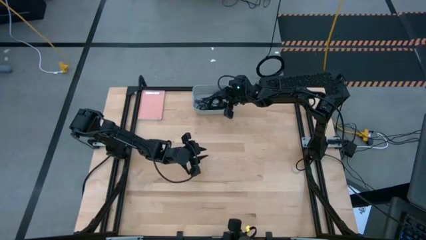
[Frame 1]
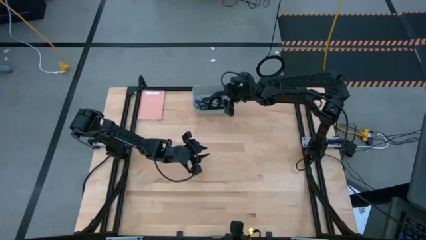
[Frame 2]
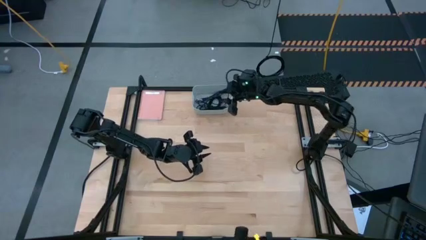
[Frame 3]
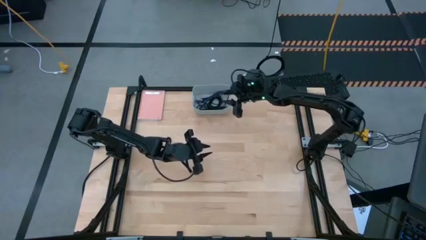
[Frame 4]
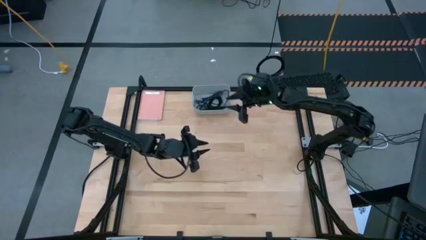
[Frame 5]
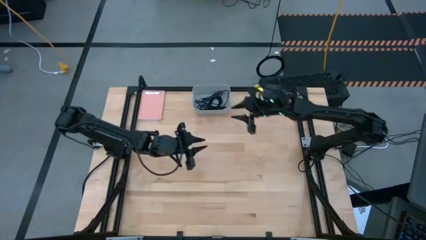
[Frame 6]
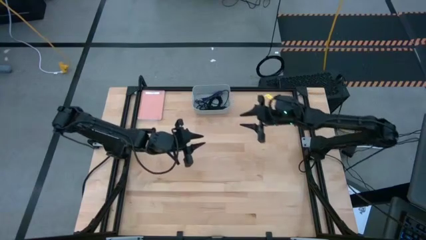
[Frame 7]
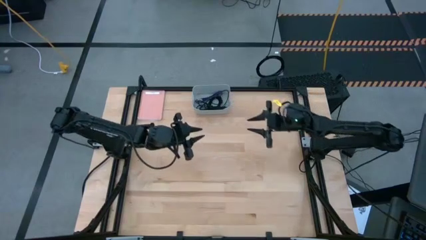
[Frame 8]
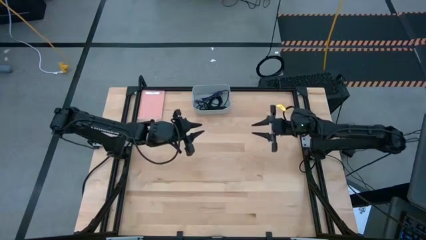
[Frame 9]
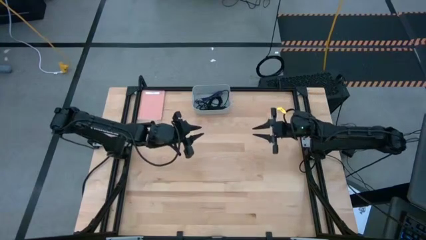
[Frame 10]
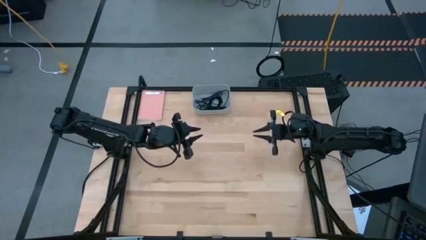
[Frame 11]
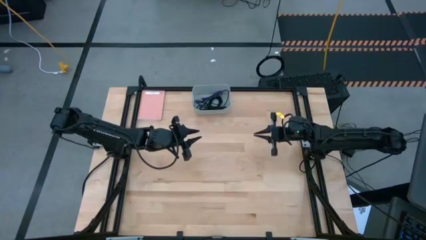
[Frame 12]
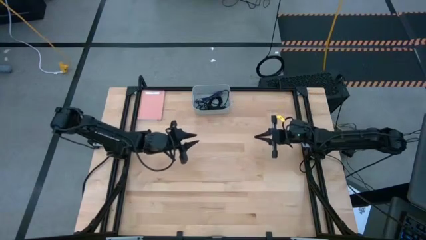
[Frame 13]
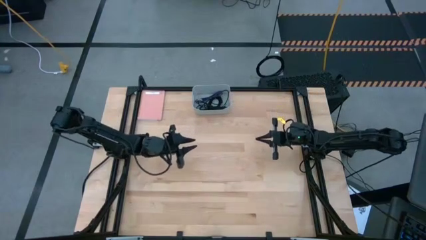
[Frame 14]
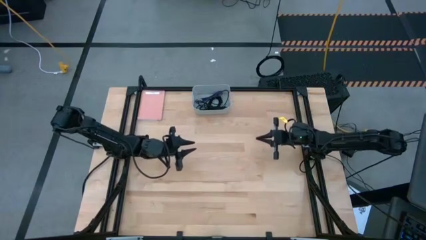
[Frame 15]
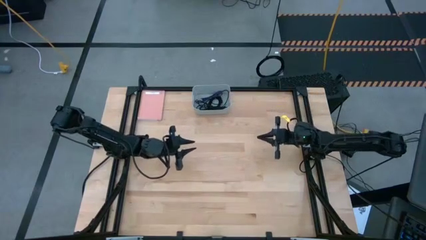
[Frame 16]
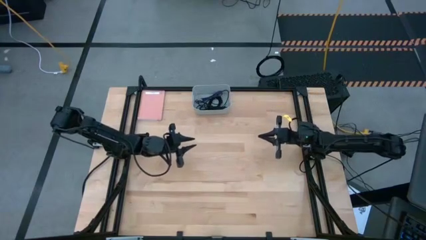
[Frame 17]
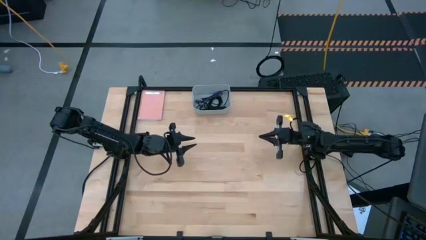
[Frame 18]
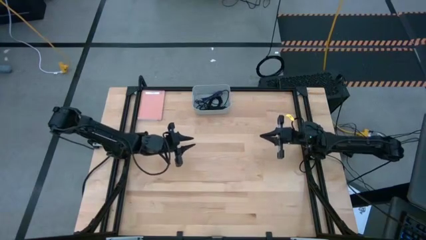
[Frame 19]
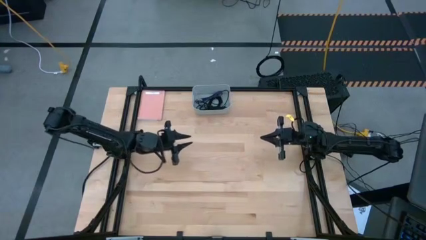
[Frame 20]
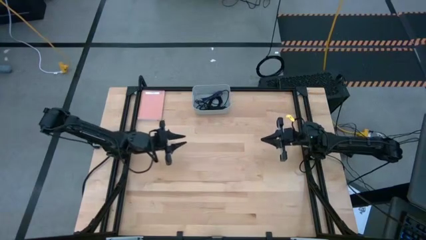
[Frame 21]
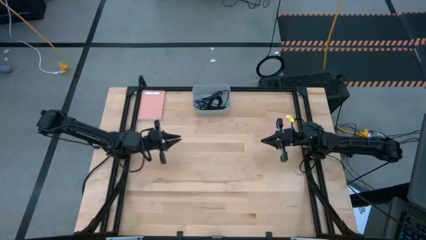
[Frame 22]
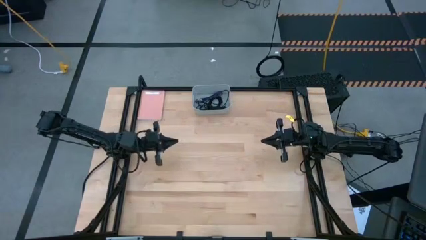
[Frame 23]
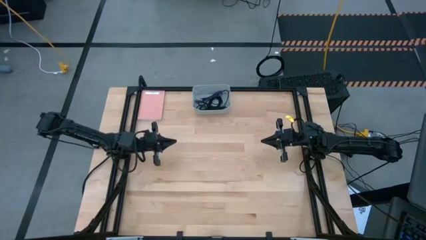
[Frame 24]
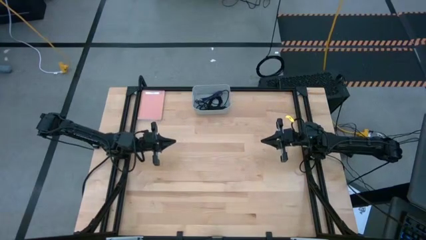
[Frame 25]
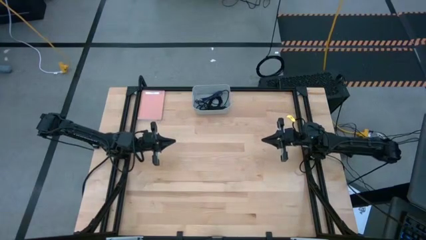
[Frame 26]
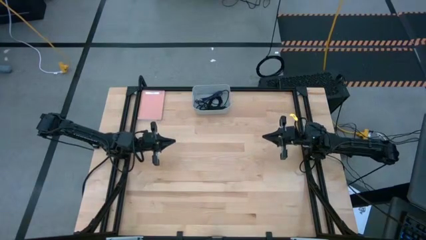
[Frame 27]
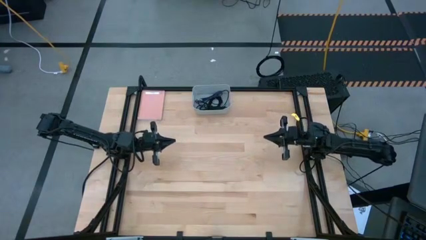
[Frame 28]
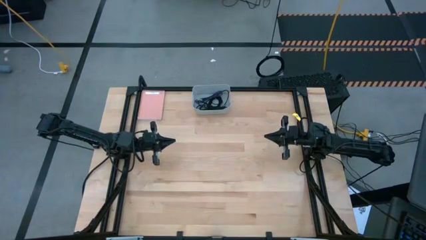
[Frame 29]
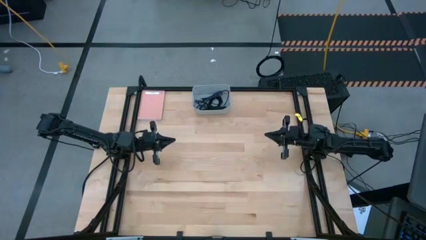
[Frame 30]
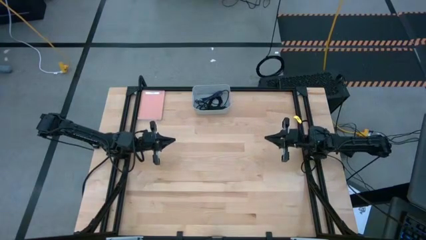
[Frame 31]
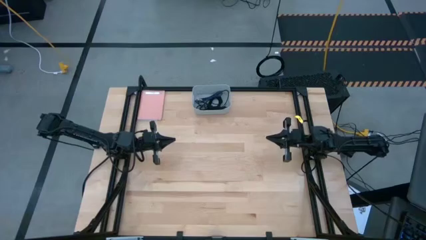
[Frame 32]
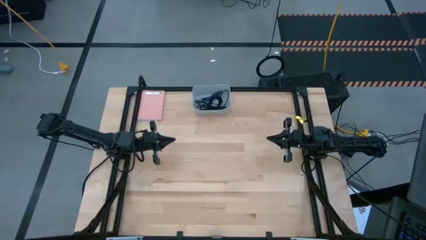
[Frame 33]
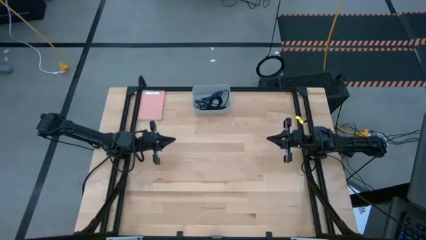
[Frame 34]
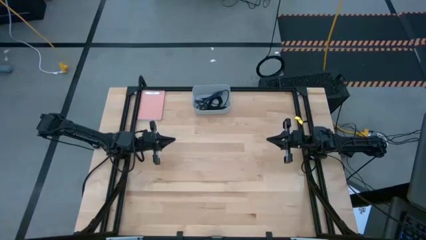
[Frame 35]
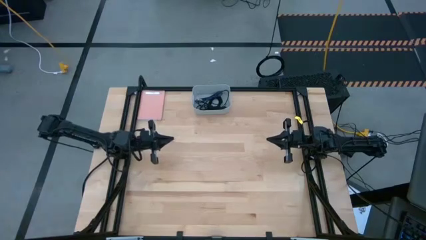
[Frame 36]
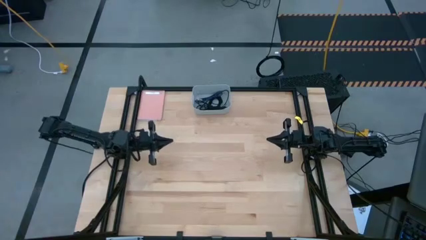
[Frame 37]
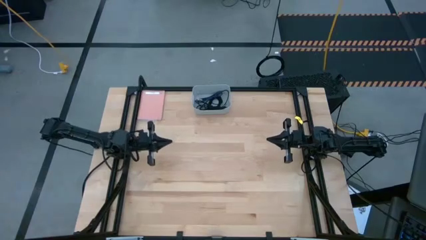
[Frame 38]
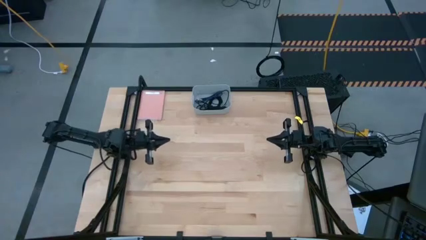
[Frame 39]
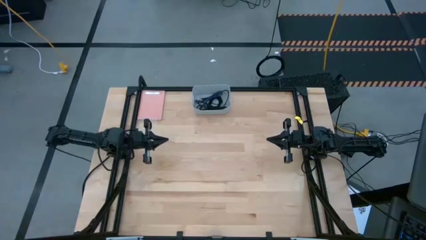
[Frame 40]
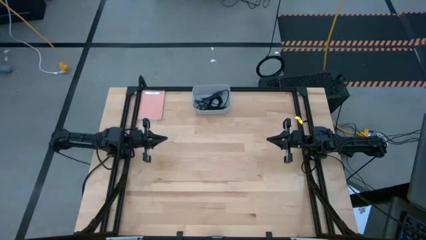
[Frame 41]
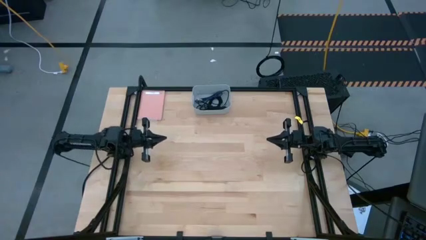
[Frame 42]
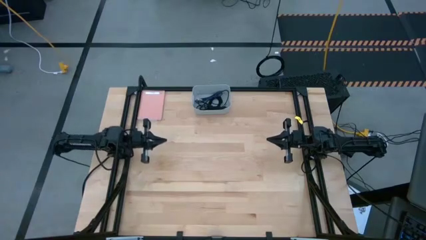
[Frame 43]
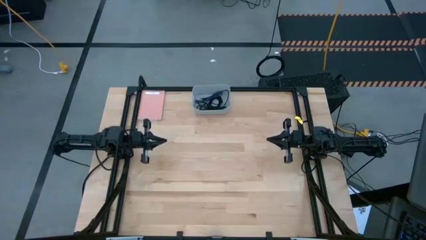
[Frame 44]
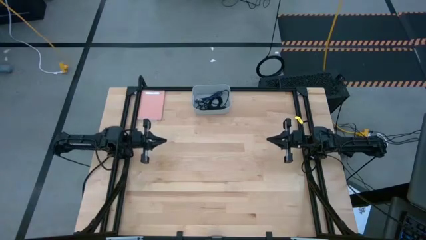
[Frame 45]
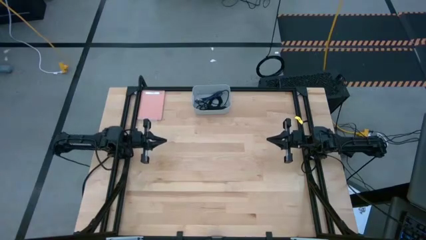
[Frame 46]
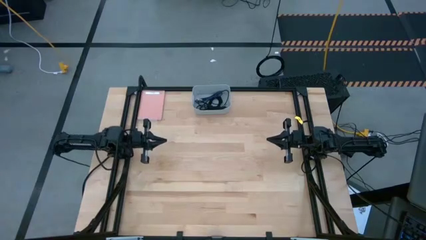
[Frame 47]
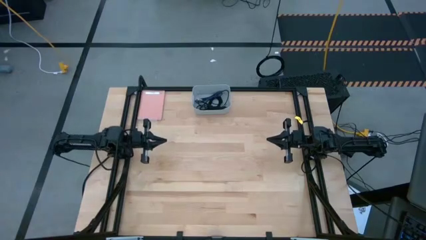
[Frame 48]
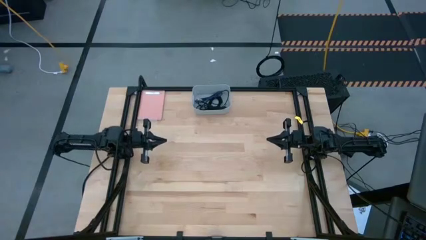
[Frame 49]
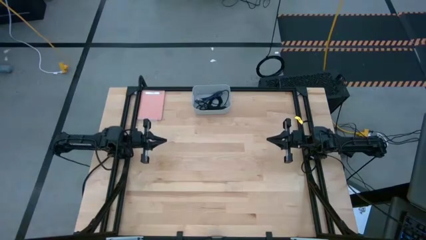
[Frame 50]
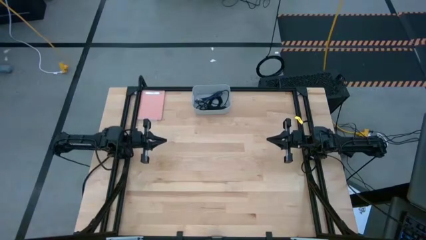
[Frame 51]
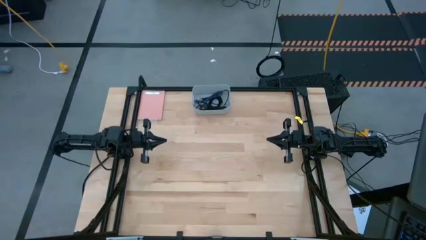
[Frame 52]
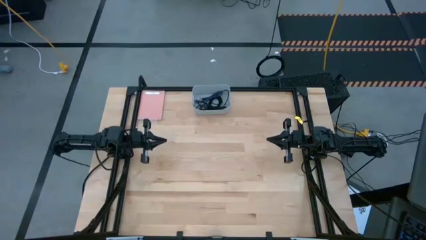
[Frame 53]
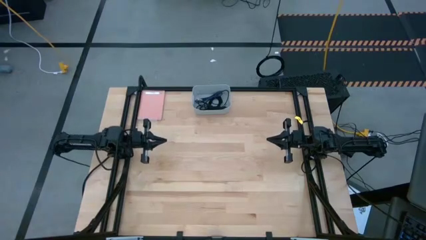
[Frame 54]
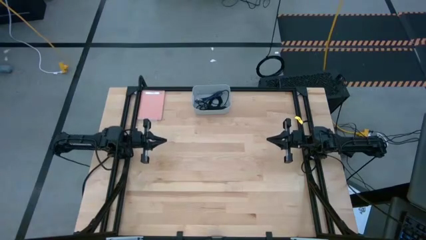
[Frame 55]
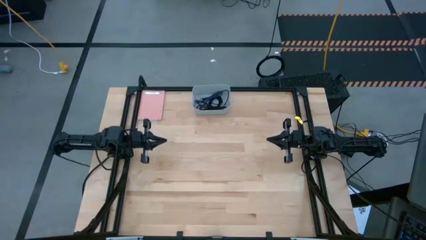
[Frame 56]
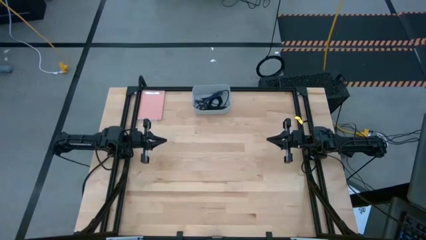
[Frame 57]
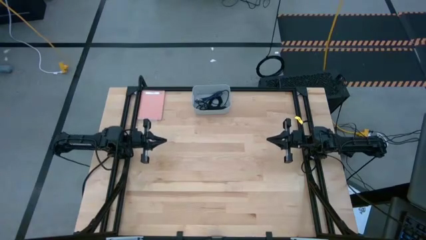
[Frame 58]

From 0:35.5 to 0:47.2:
Task: Pick and place USB-C Cables
Return to Home Position
